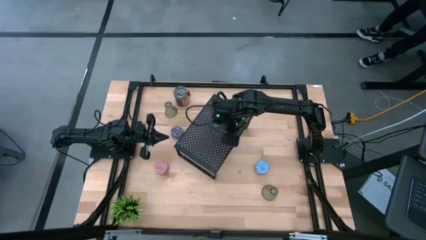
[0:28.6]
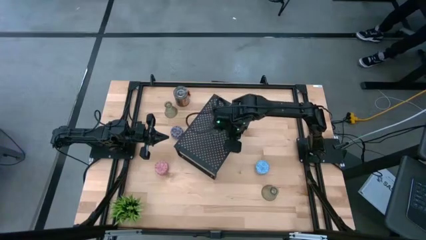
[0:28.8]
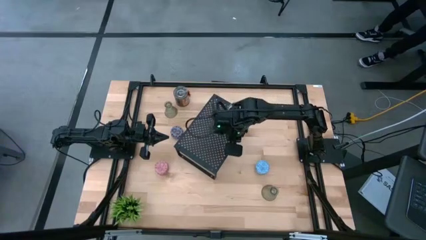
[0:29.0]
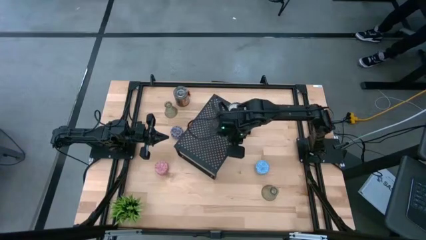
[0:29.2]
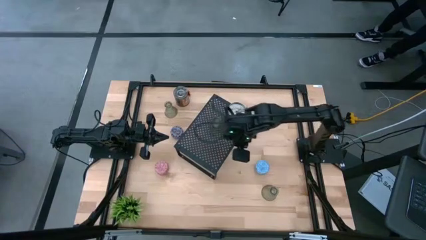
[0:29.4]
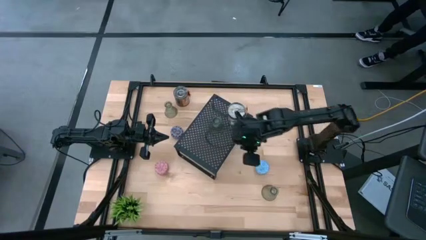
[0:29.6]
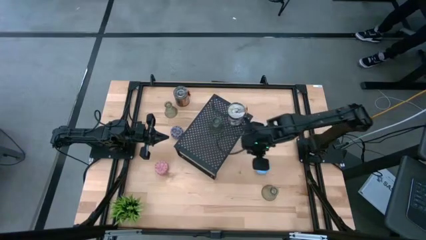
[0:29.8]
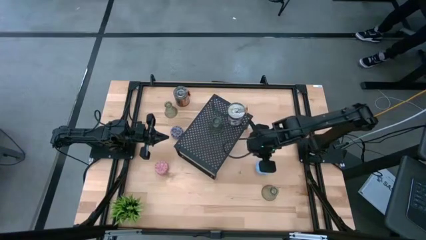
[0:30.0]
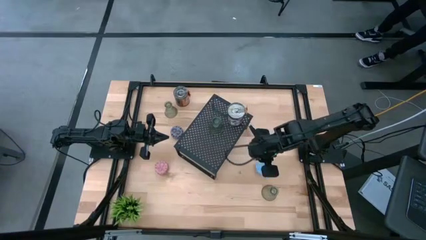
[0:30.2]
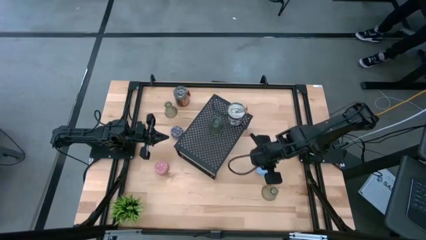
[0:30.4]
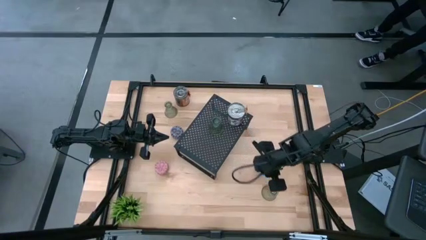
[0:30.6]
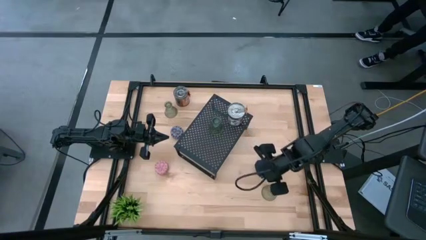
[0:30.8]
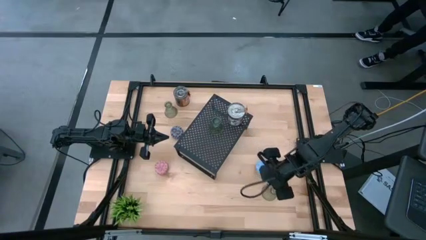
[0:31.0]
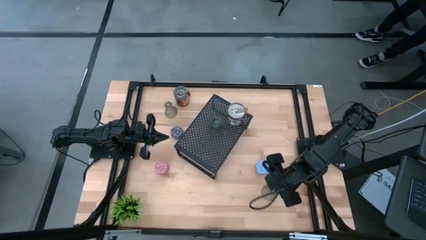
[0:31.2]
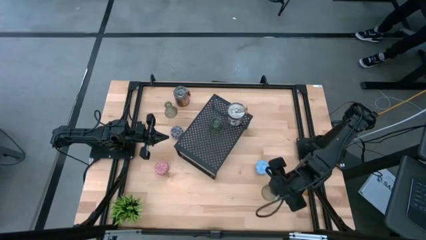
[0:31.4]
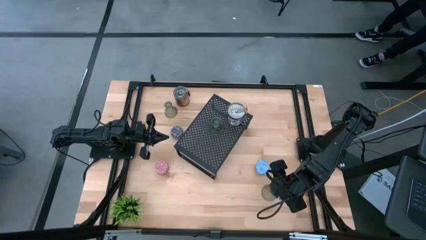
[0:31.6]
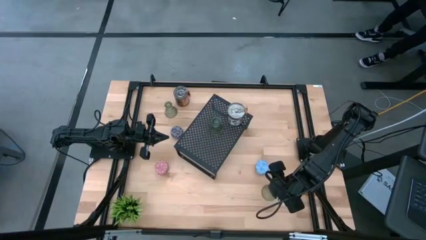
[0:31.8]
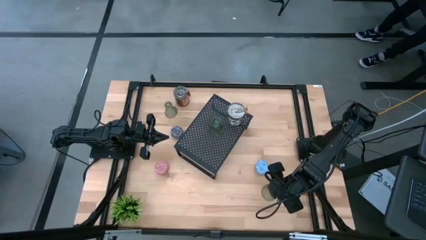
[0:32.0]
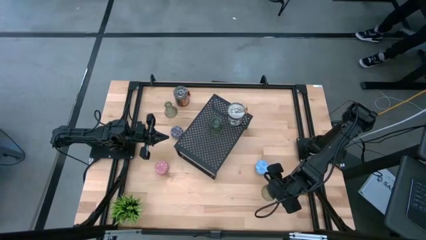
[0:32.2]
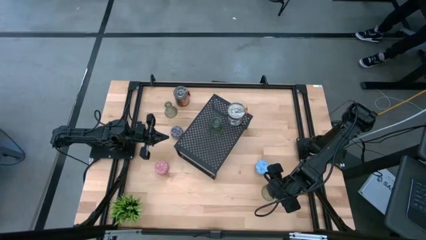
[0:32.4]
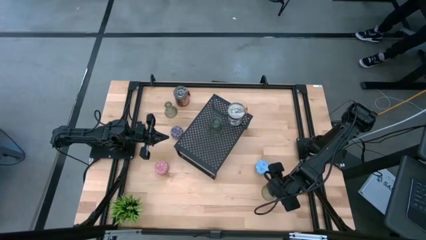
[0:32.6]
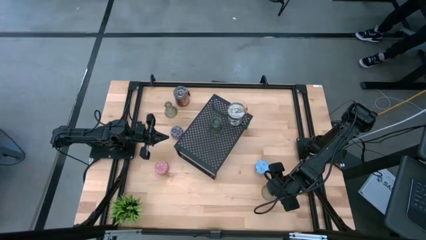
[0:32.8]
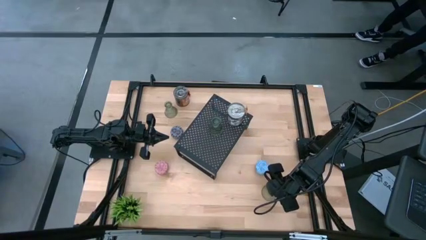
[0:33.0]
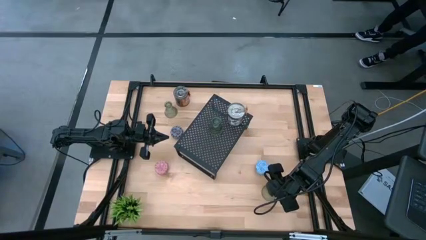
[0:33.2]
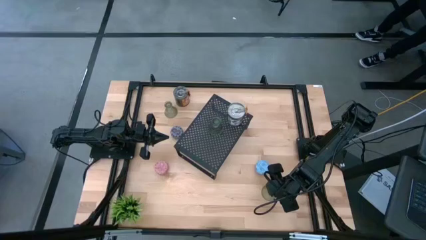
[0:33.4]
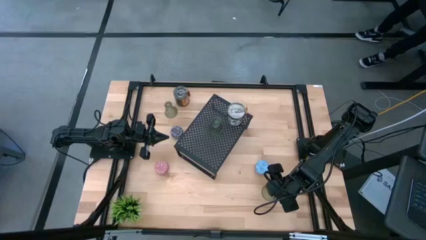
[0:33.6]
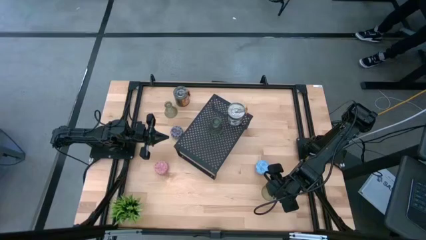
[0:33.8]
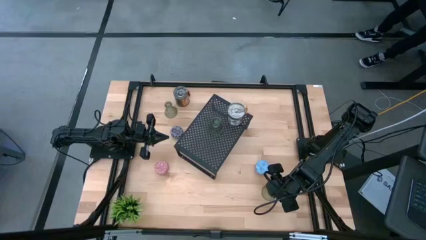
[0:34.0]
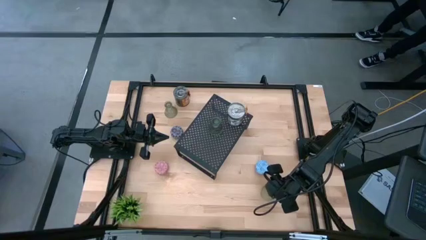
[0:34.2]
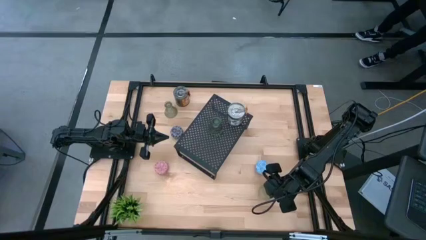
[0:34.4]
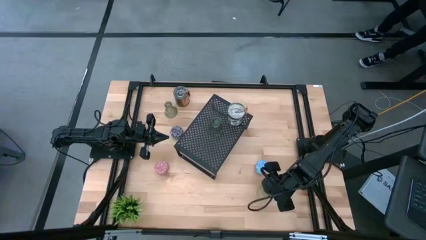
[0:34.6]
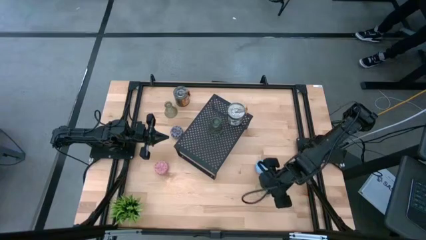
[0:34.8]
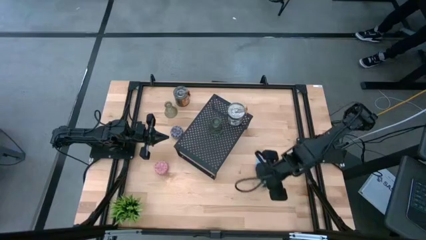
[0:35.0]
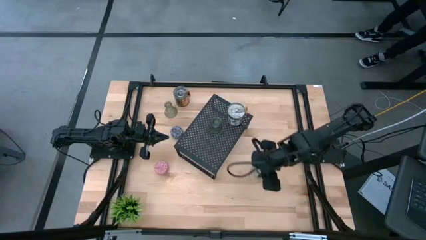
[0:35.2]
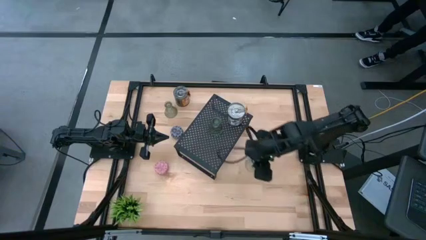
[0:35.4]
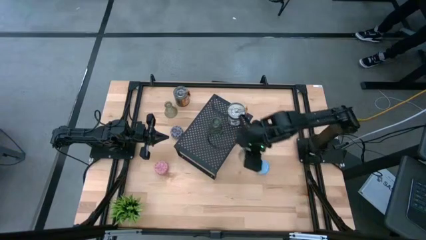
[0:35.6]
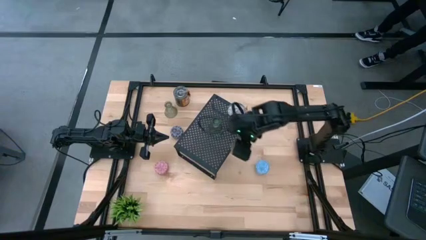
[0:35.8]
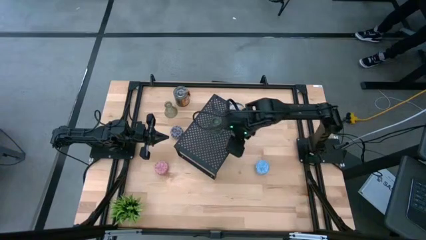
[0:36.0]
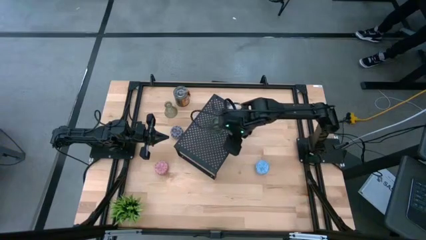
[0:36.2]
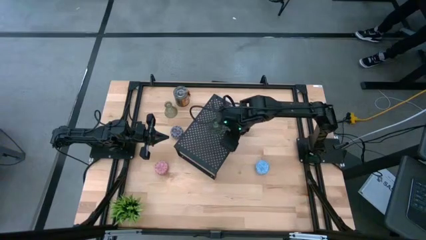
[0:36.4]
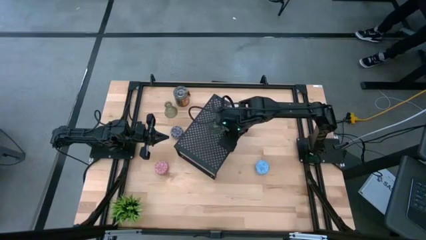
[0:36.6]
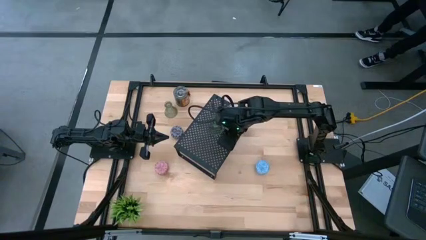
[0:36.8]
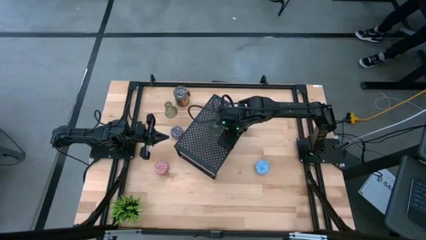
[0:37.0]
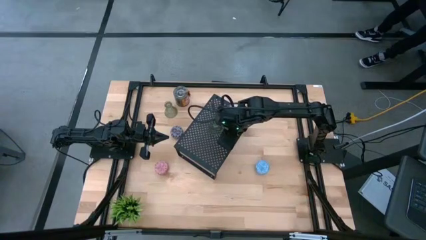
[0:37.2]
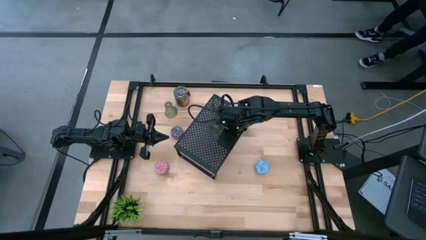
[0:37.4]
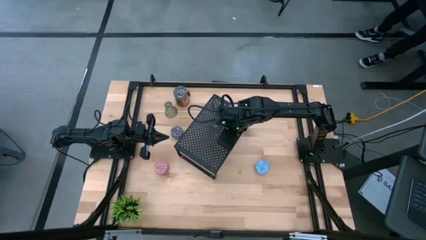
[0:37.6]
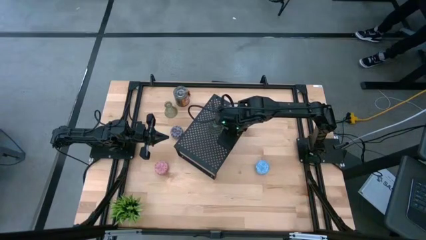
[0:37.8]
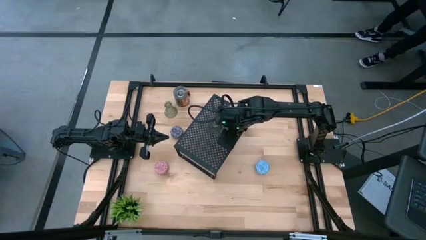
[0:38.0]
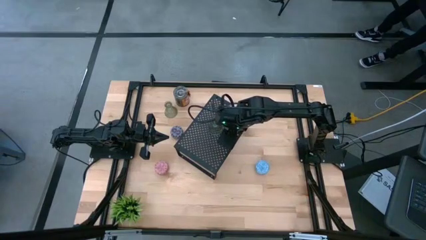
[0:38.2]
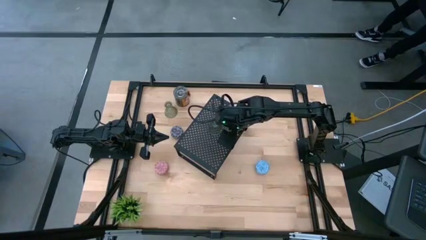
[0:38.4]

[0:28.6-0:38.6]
Task: Pick & Place candle stick holders
Put the bottom glass candle holder on the shelf

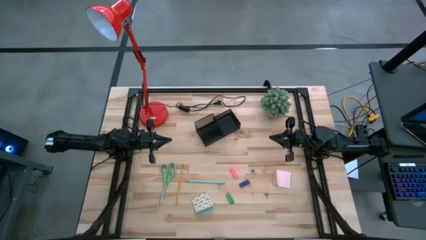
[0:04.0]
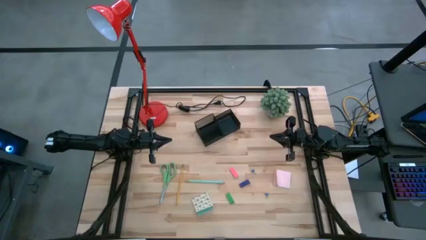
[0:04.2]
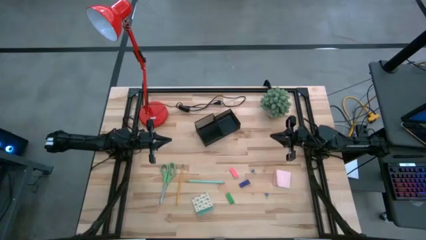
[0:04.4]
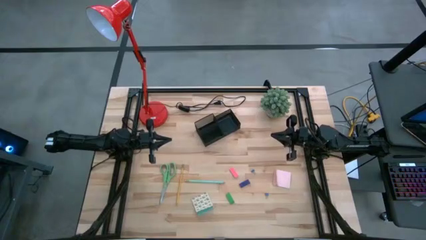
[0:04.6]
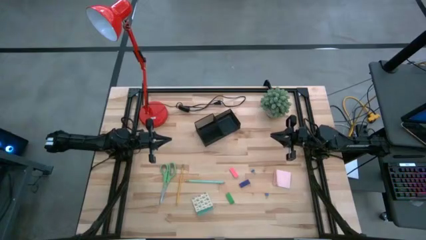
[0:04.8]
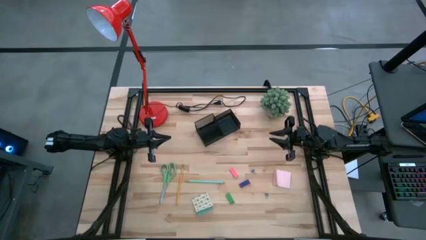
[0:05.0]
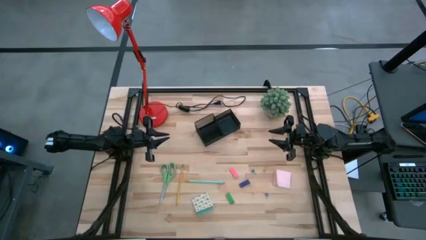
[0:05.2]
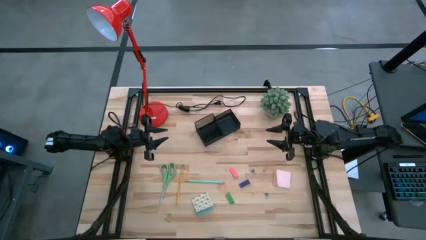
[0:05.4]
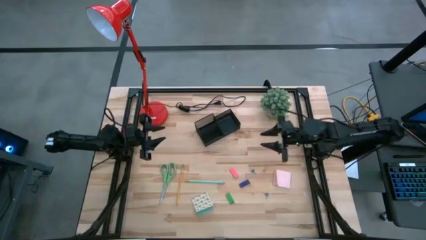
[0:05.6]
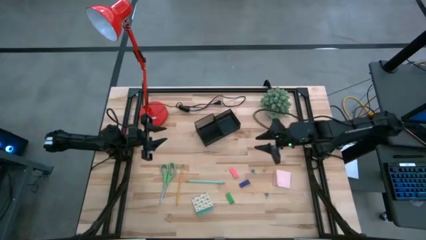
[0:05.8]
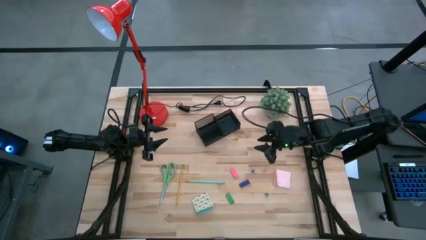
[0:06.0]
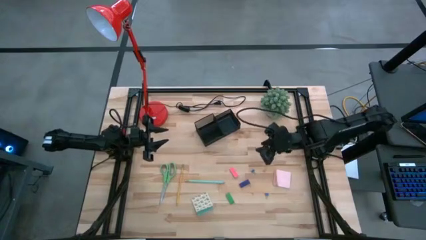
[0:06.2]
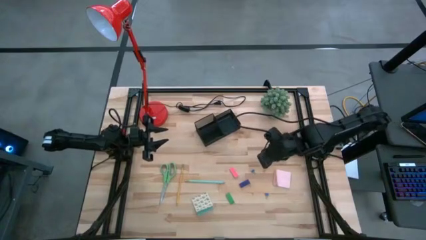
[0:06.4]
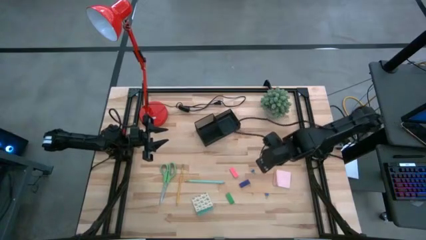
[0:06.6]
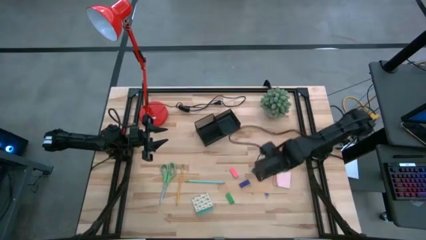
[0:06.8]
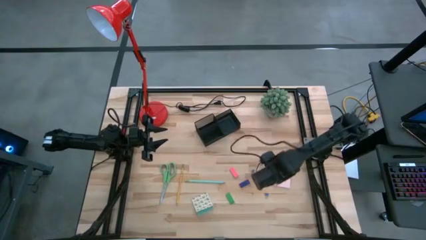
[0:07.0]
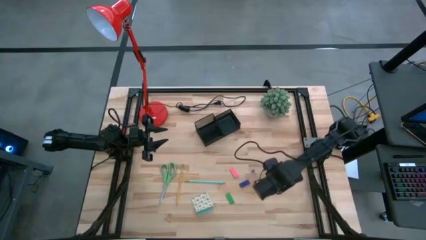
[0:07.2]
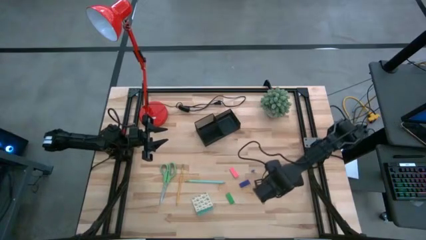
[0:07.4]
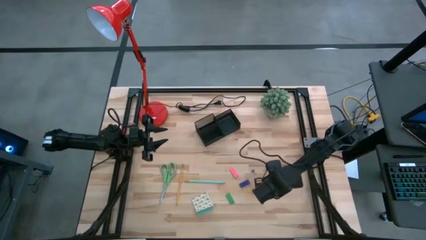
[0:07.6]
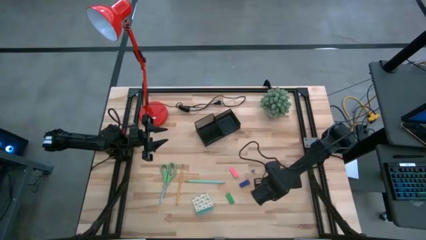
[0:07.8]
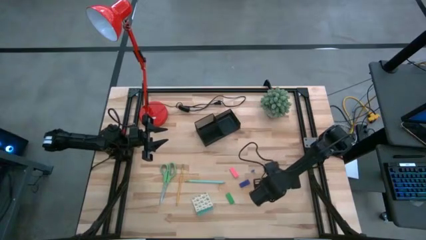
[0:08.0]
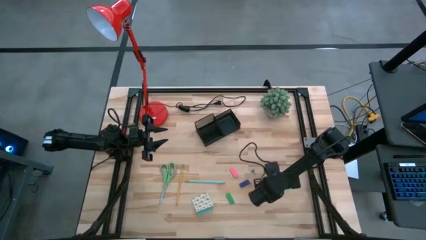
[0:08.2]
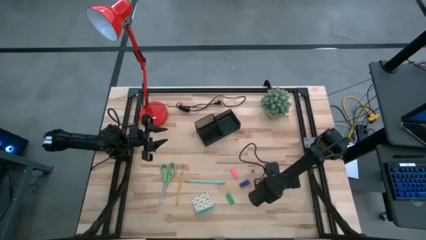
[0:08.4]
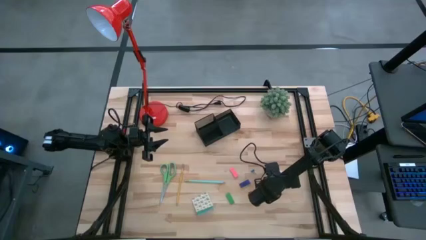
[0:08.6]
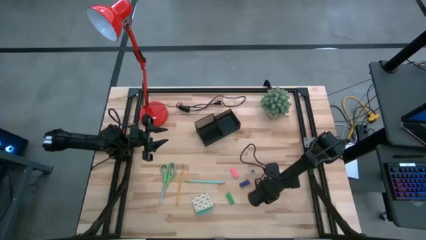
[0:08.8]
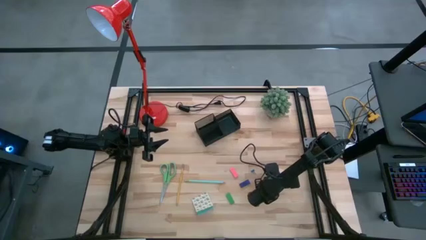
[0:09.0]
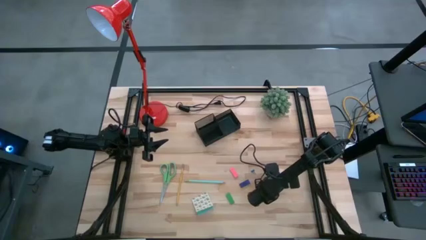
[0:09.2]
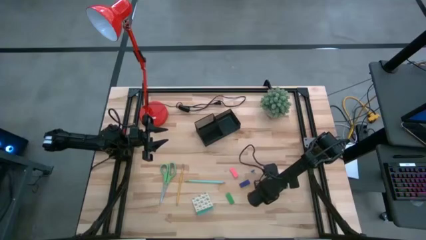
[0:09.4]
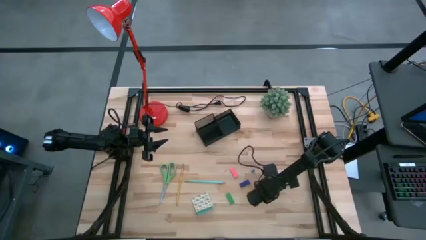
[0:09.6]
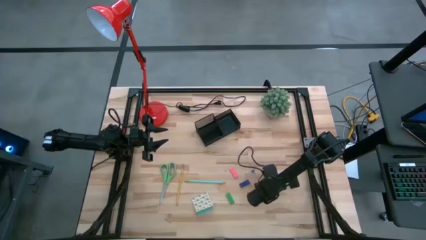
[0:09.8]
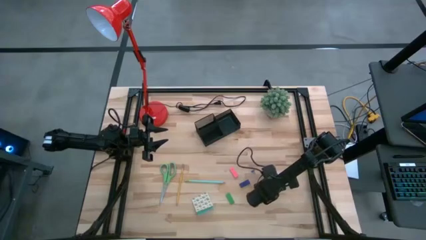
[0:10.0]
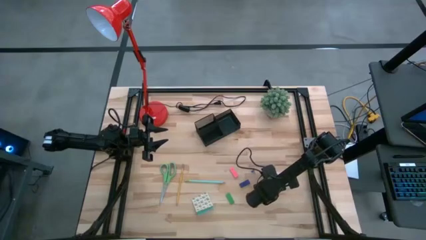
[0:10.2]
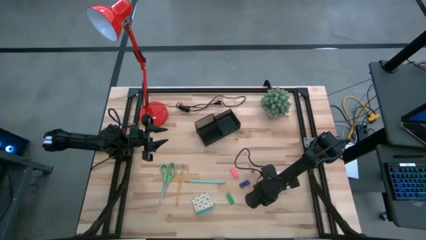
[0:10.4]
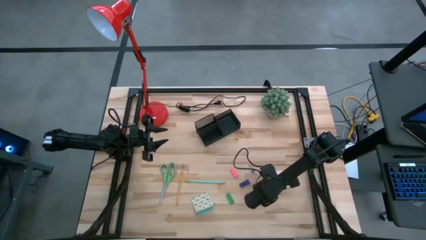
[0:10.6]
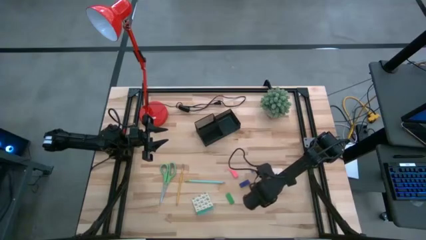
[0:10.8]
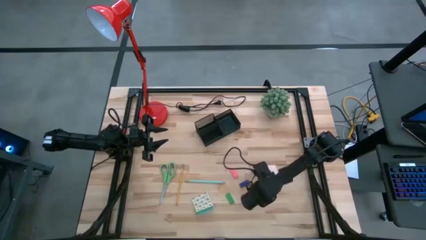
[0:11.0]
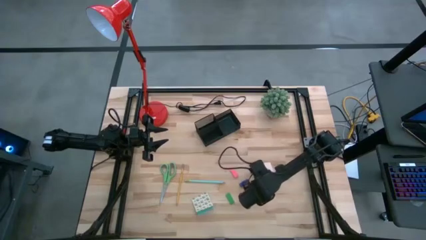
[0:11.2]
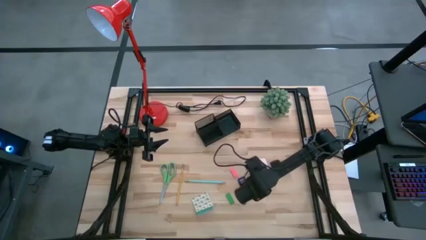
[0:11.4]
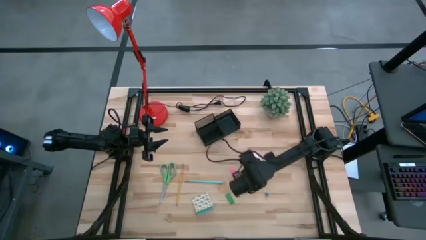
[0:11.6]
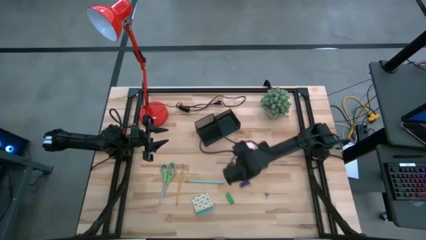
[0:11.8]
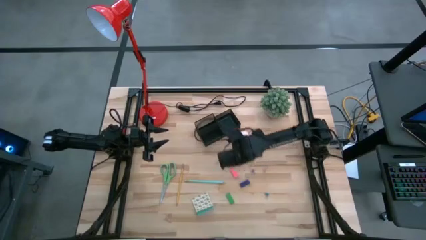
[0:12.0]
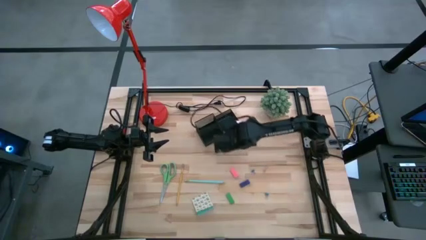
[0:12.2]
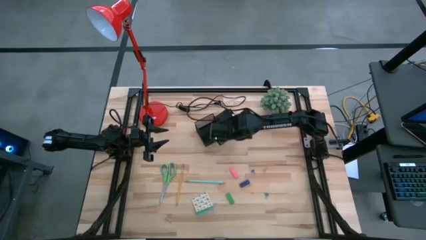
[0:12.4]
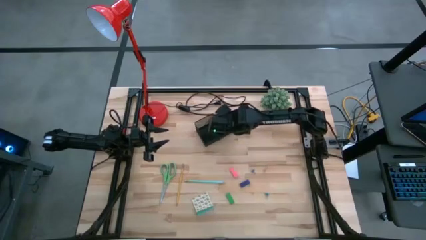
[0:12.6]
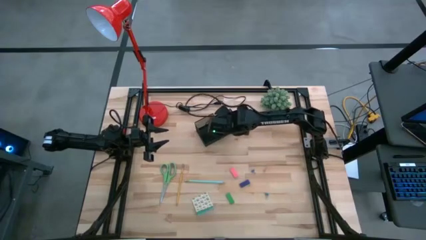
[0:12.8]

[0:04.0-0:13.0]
Task: Pick and place office supplies into organizer
Put the pink sticky note into the desk organizer
